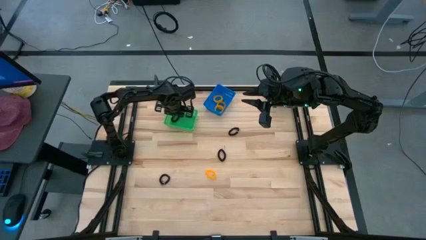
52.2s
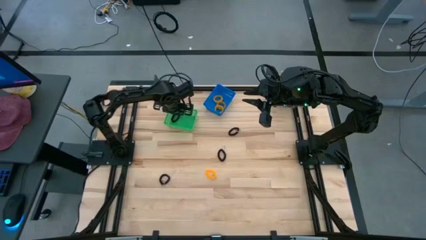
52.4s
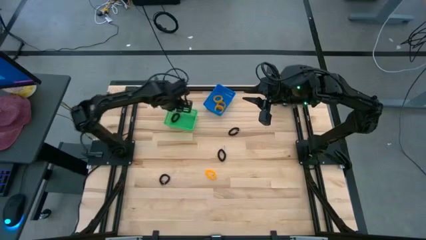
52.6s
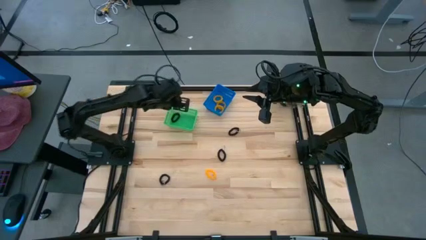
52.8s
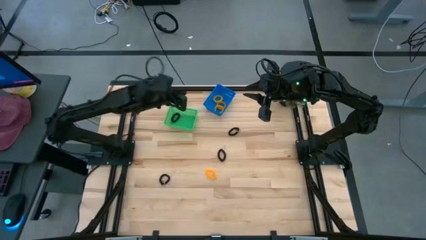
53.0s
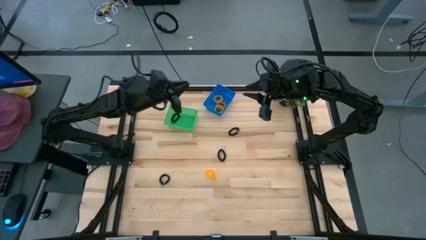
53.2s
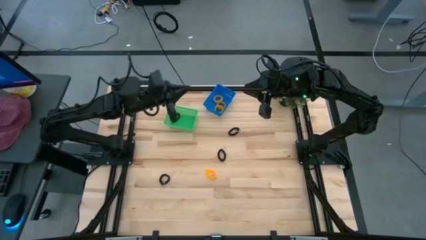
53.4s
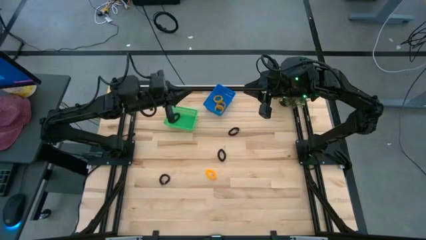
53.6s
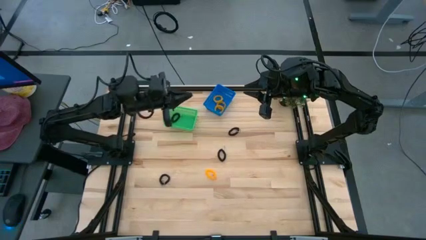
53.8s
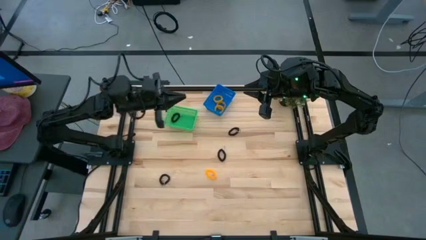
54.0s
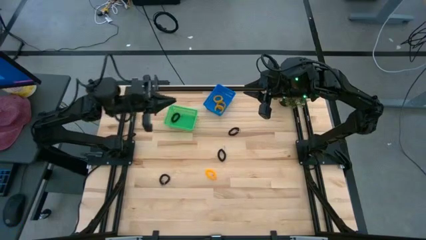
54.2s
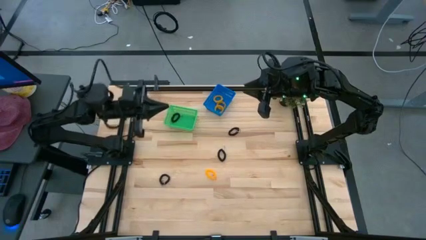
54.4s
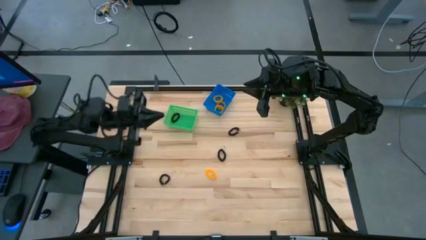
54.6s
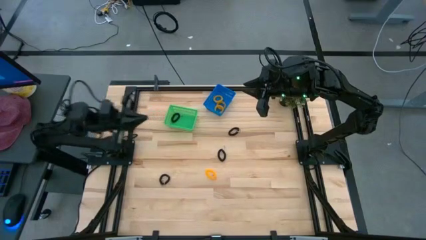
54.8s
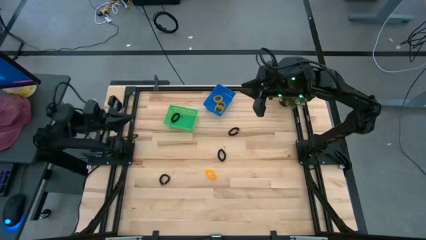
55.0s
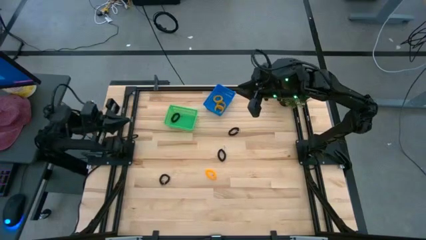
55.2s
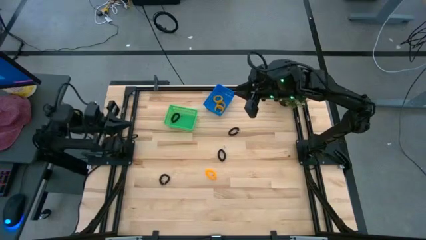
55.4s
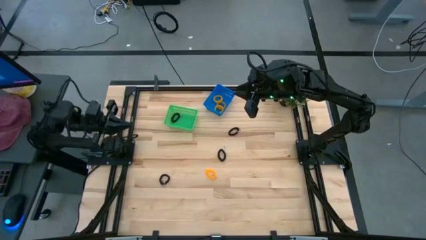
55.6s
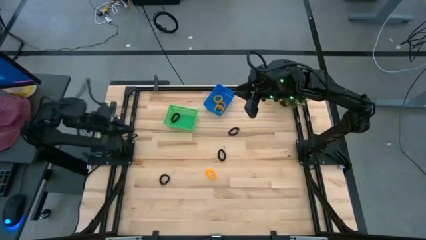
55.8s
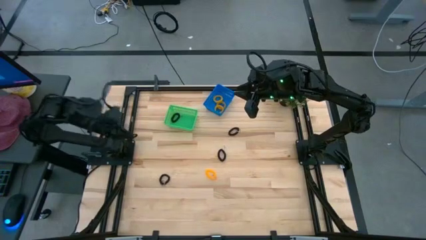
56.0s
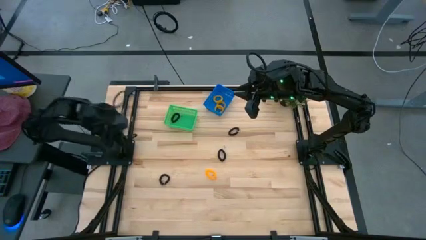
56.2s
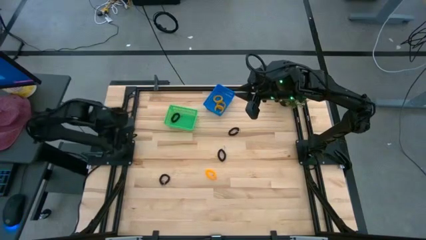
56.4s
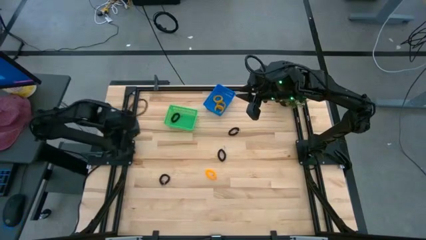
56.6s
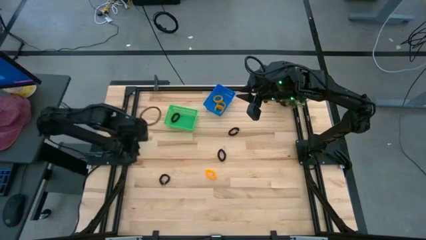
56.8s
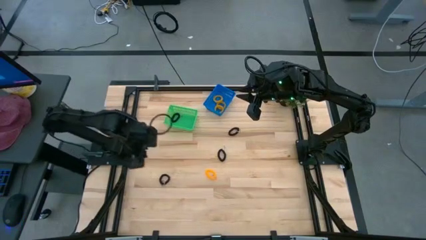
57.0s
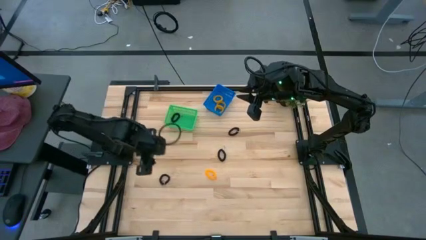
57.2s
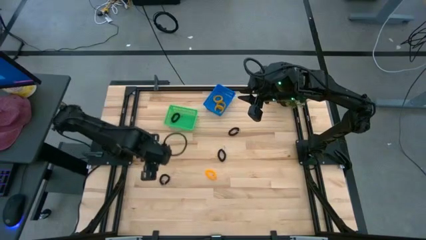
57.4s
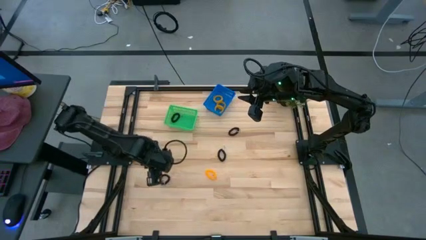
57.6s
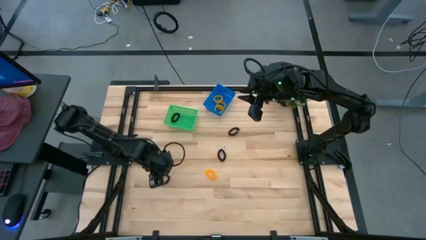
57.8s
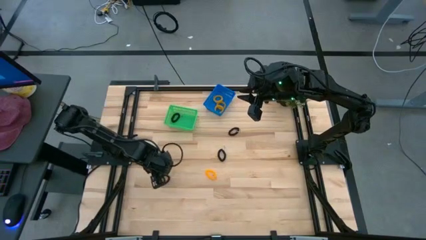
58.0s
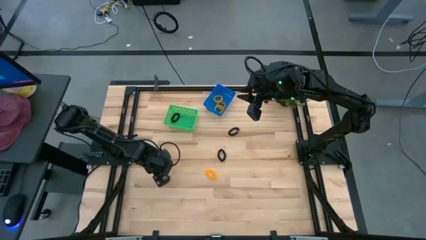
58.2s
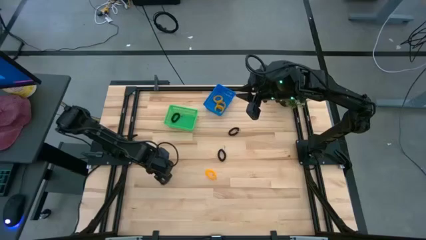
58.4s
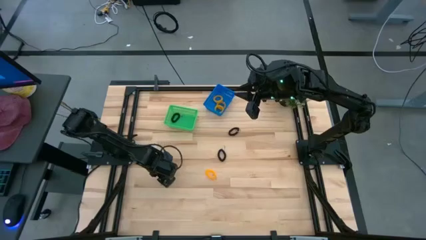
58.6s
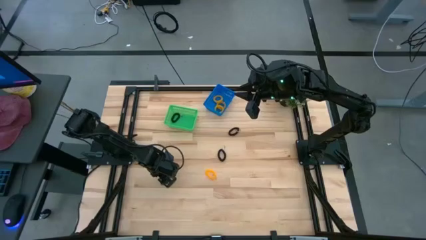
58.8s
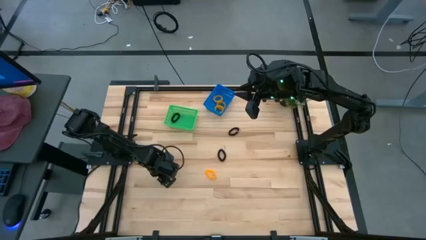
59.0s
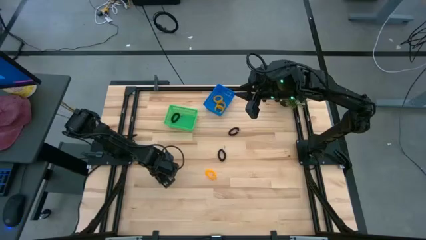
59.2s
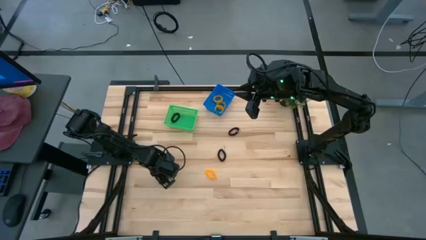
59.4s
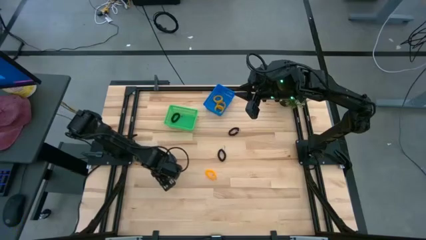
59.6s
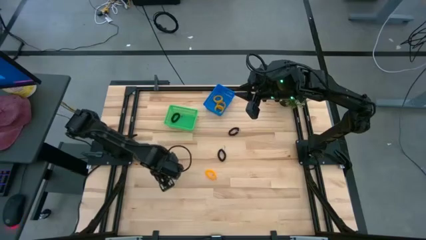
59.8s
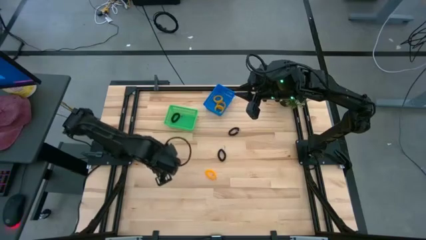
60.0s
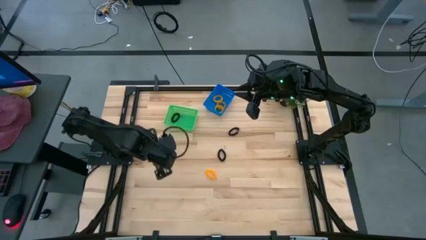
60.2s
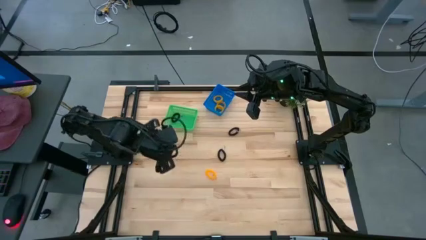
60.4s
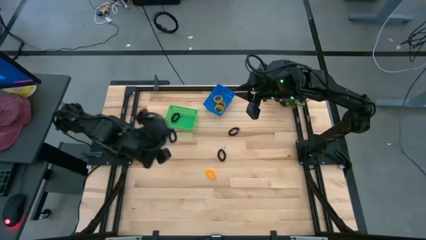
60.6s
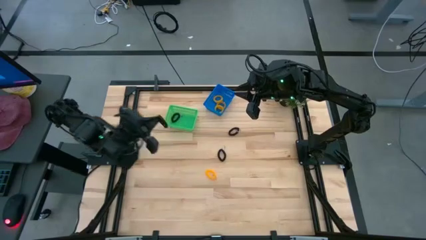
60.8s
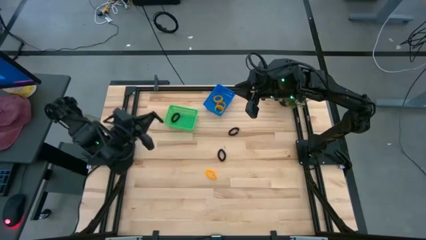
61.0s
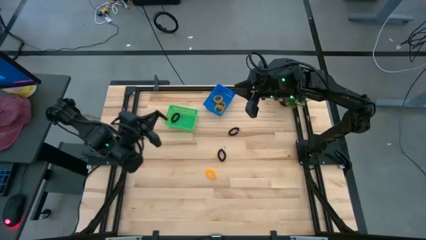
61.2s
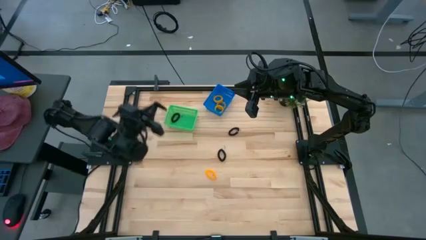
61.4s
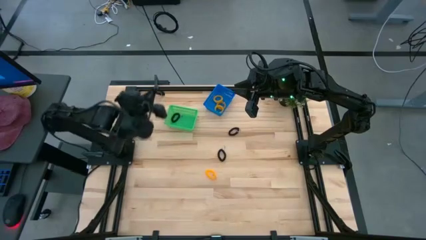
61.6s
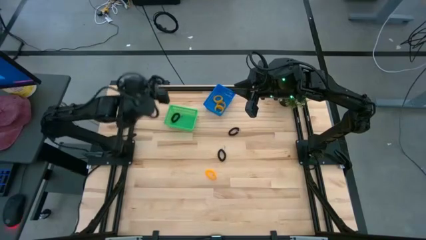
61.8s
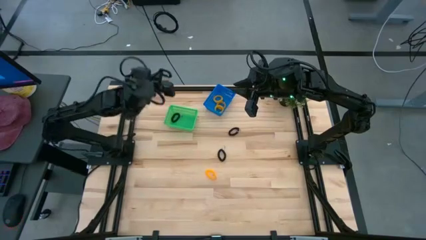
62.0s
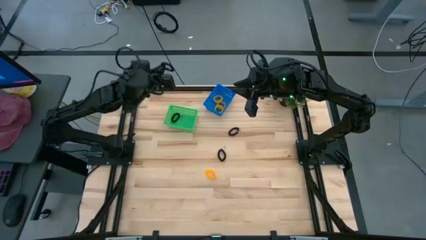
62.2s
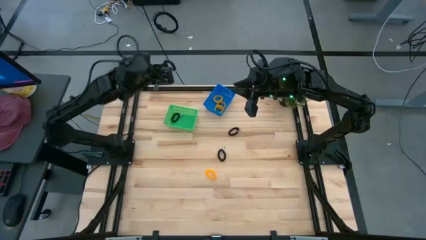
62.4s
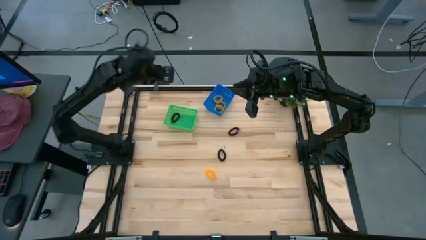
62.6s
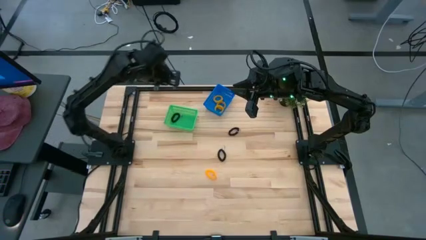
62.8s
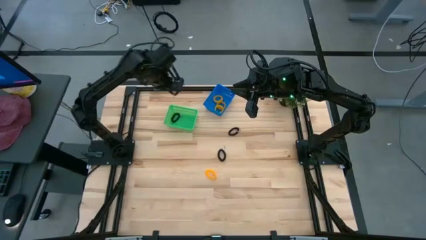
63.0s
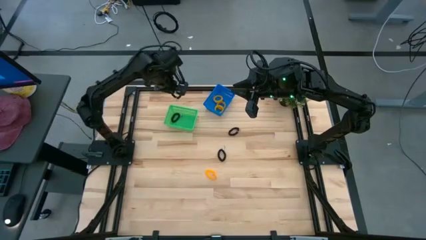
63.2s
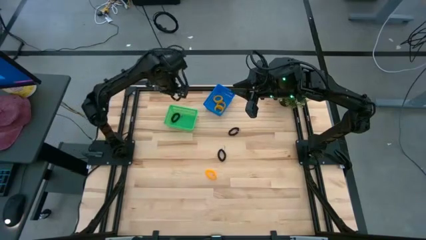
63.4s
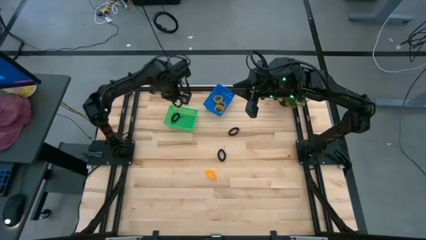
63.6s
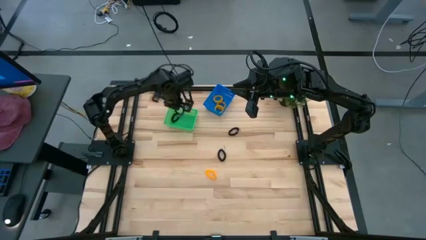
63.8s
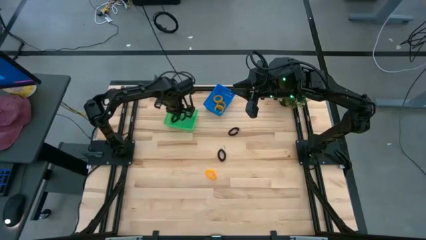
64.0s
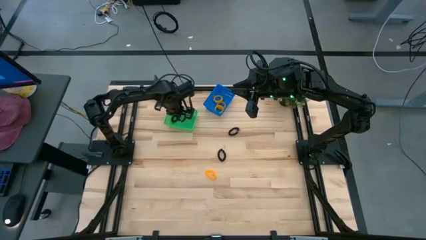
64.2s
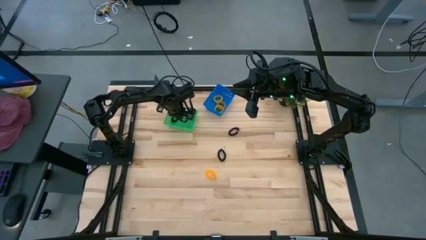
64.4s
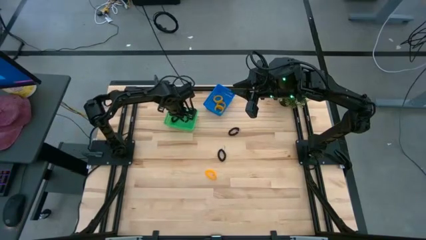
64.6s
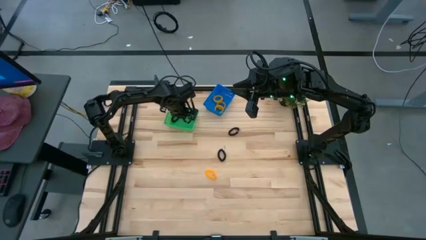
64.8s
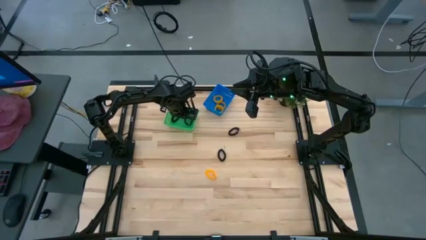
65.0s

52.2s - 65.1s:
Task: Sort spring keychains into baskets
Put the black spring keychain into the green basket
